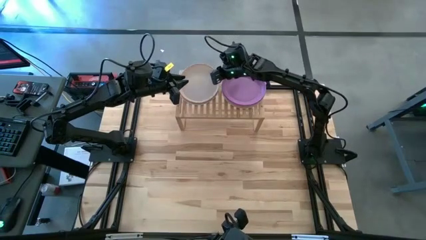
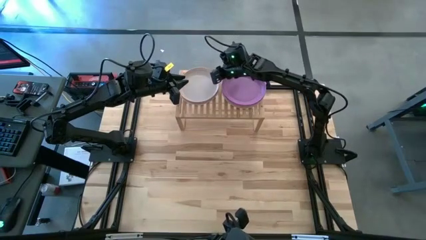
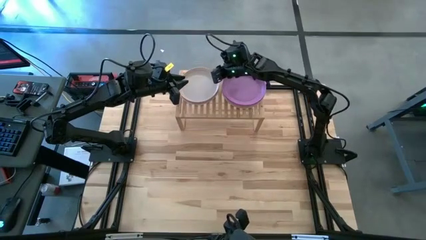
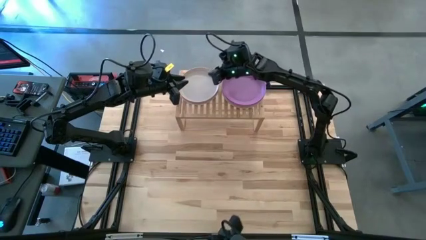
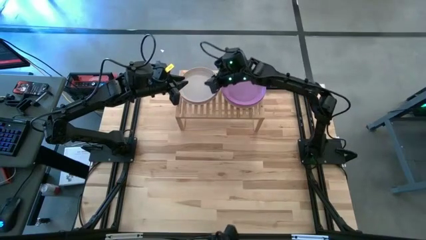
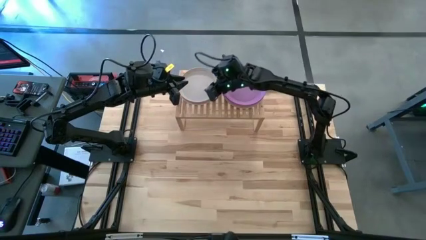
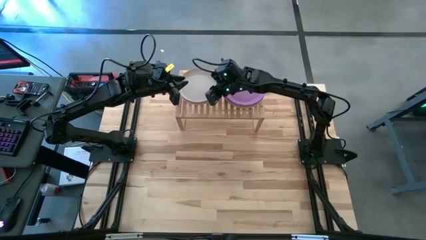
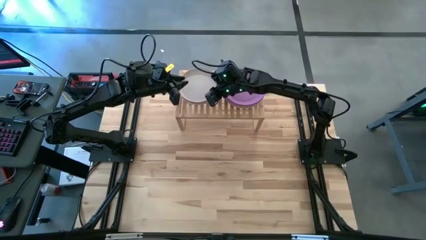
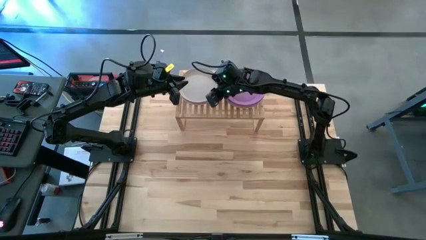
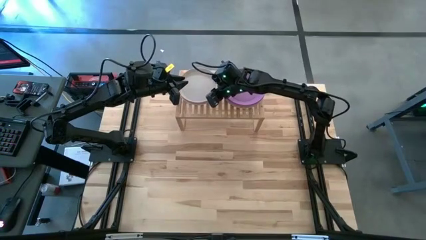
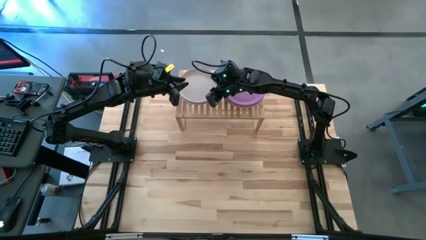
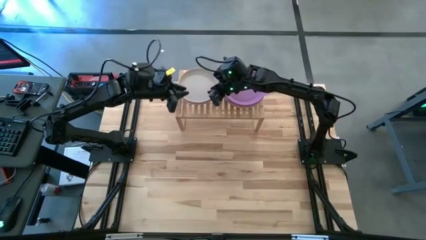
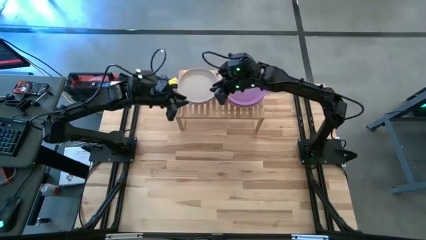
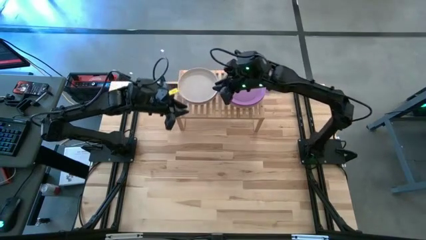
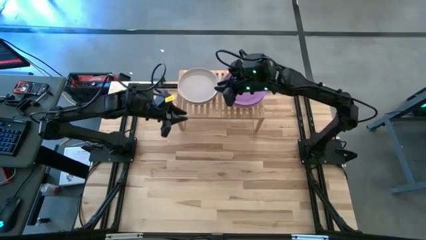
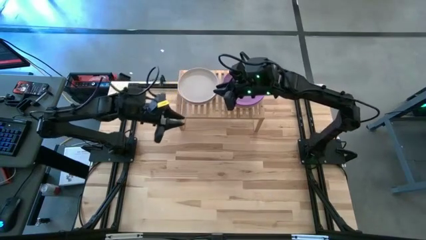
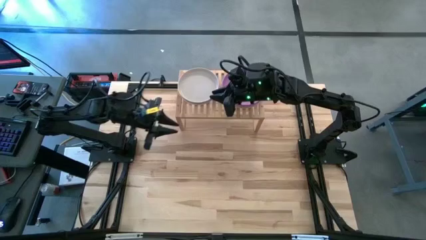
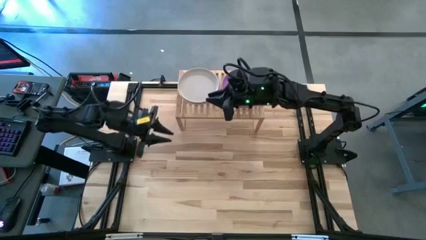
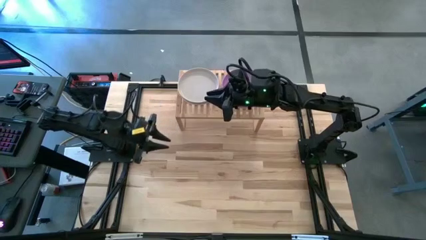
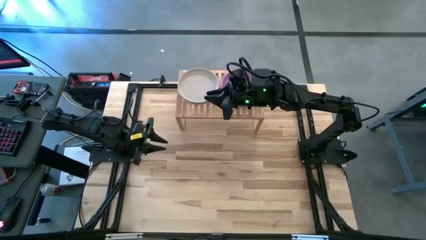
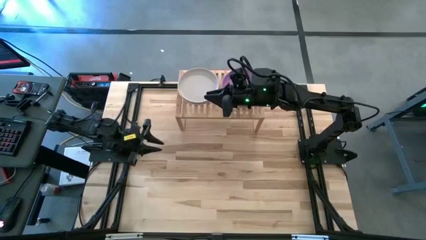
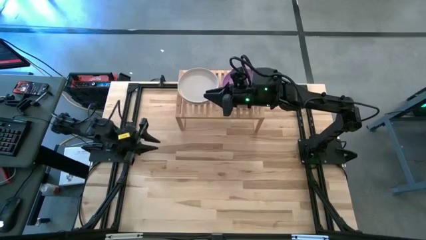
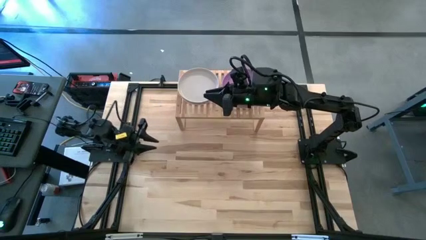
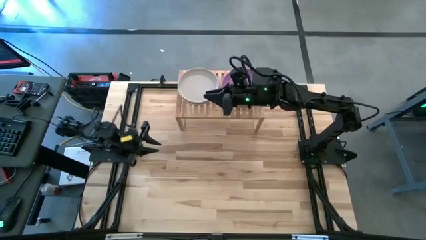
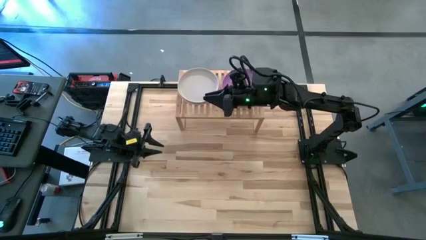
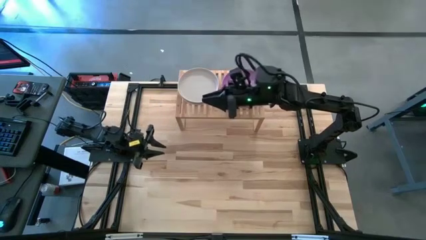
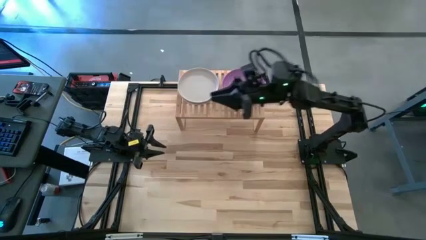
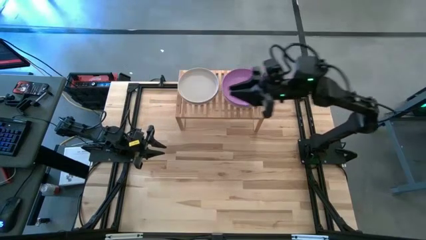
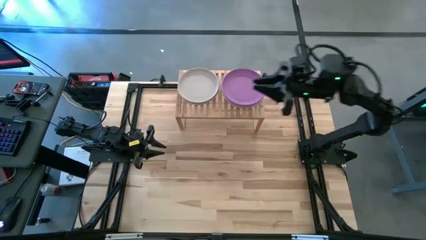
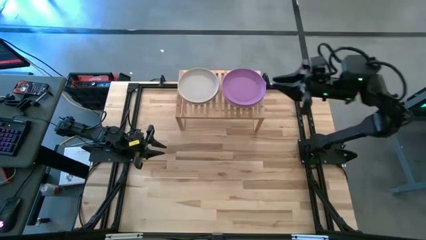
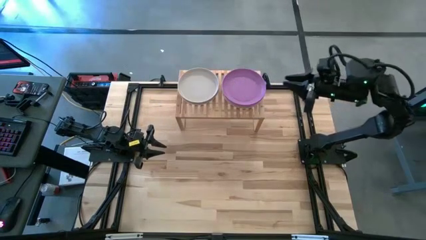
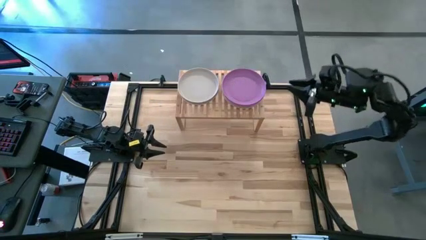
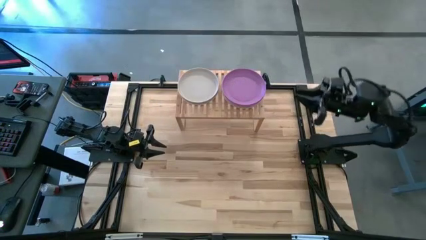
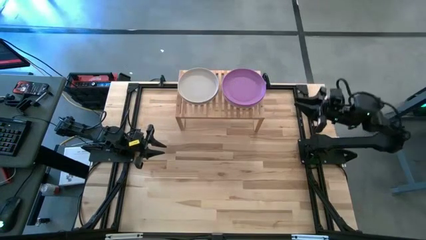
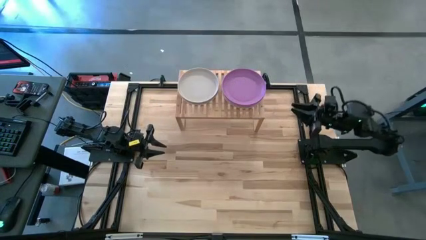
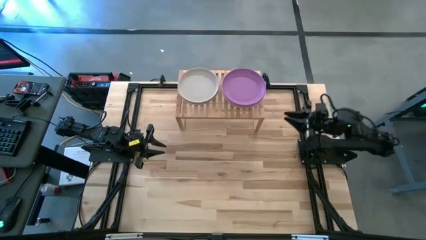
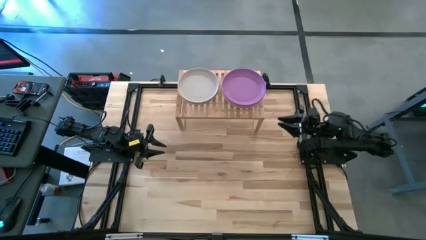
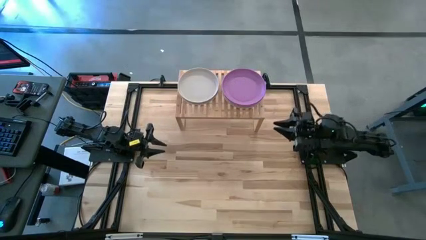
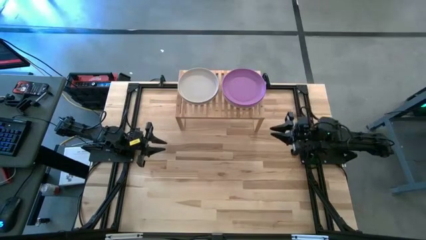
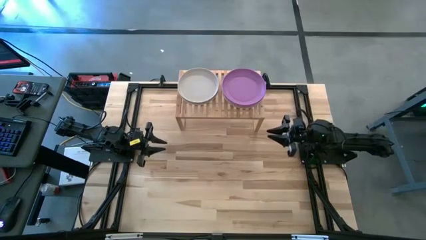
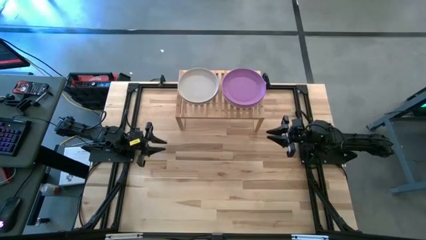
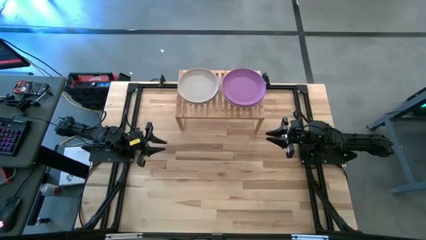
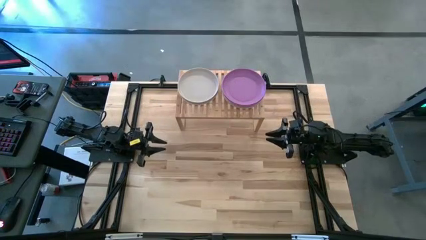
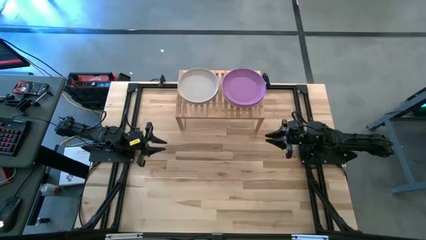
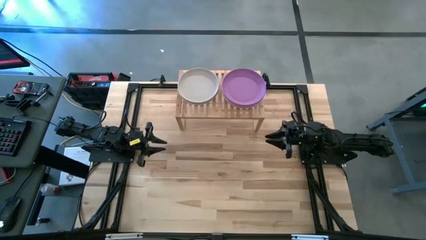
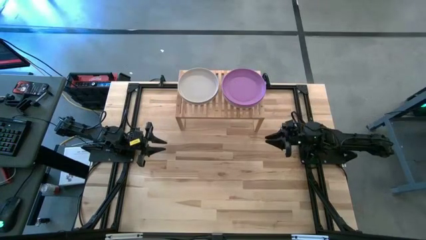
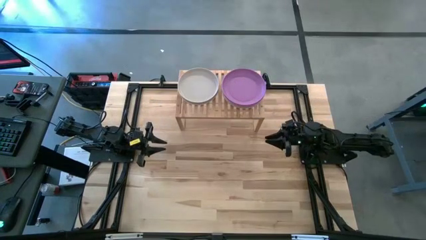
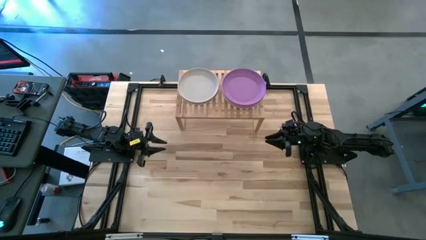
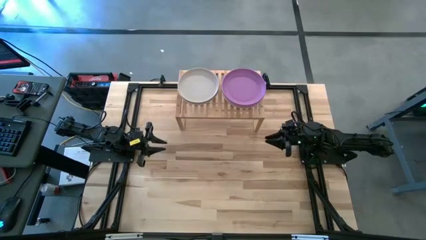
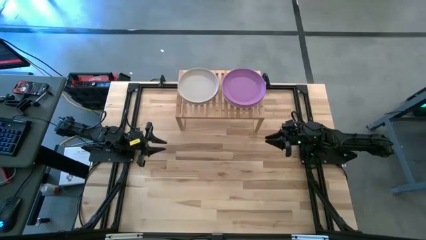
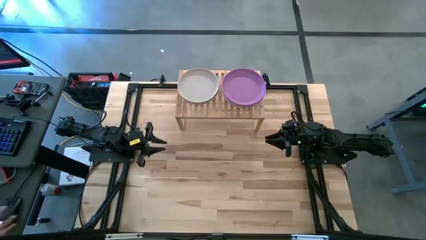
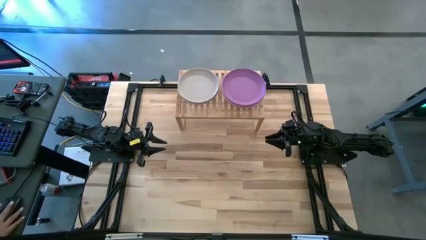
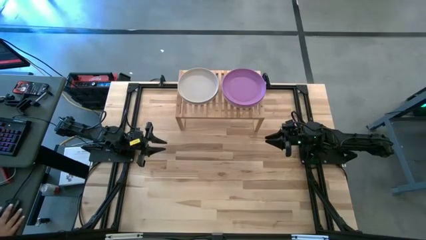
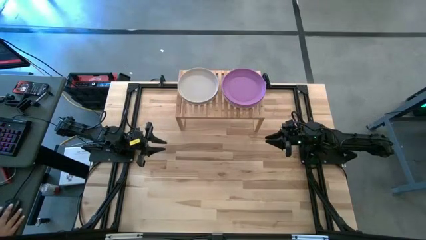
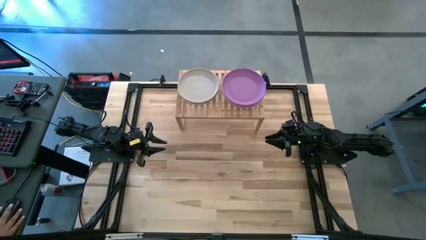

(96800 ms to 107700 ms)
Task: Place and stack plates onto a shelf
Return to home position
